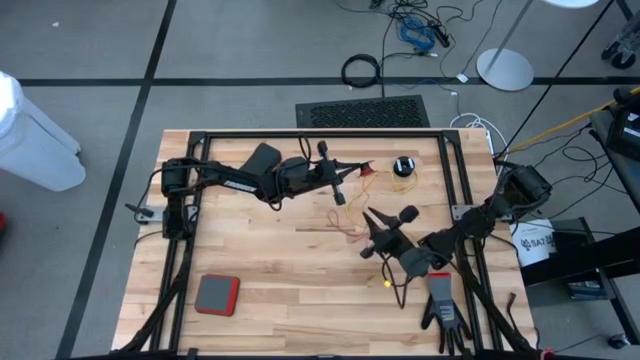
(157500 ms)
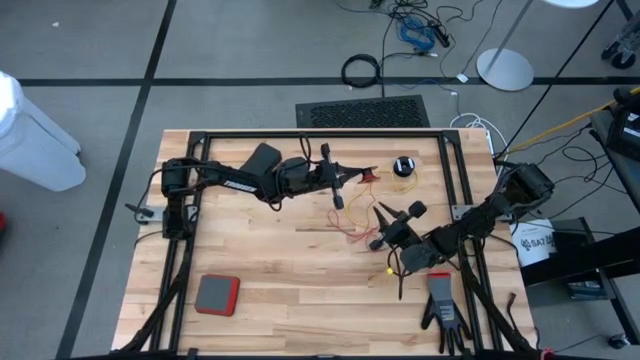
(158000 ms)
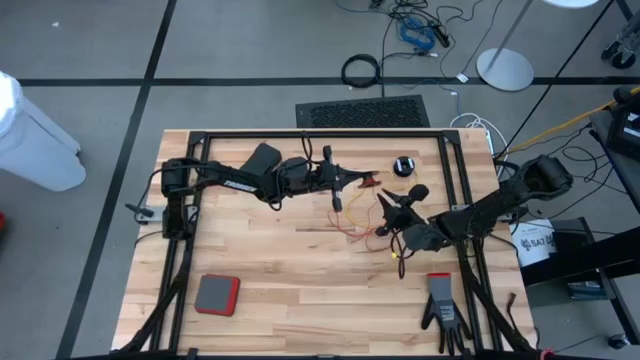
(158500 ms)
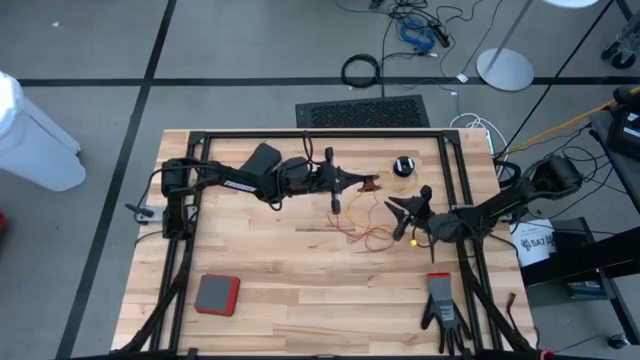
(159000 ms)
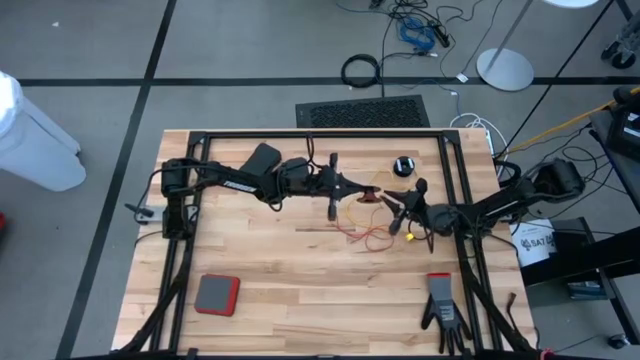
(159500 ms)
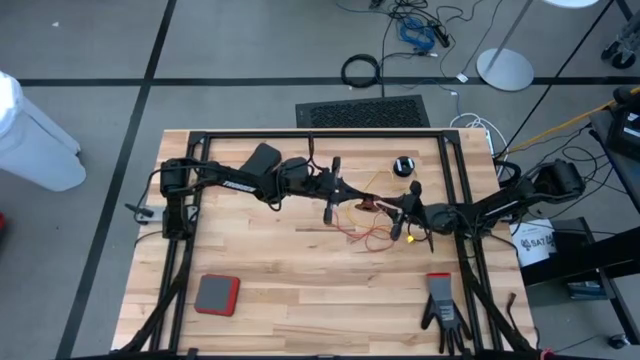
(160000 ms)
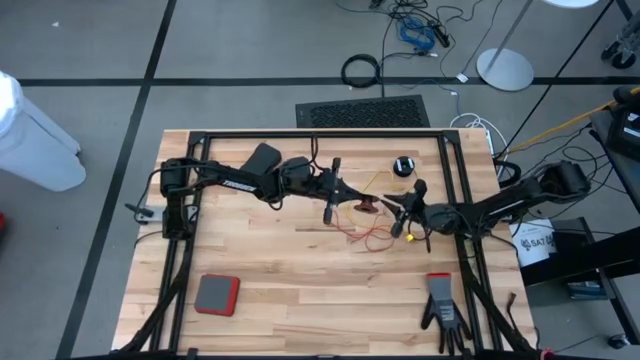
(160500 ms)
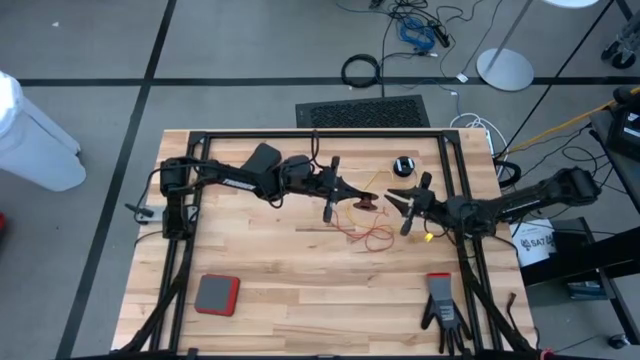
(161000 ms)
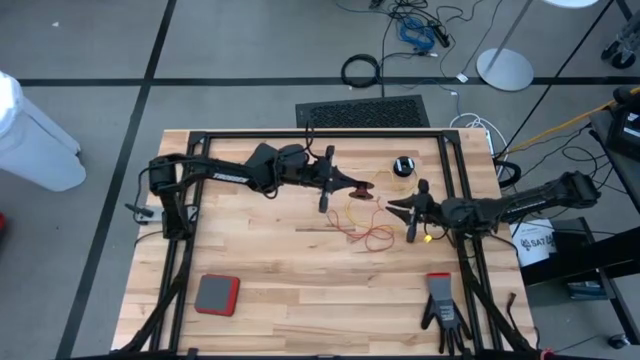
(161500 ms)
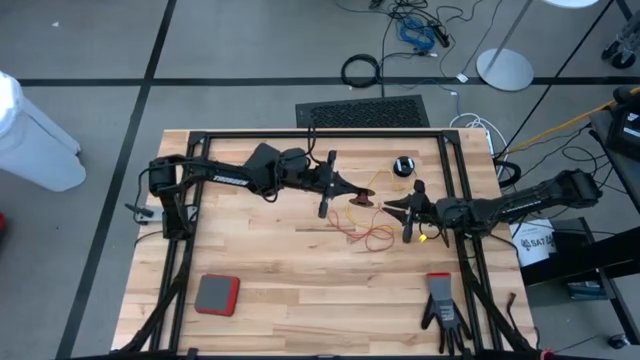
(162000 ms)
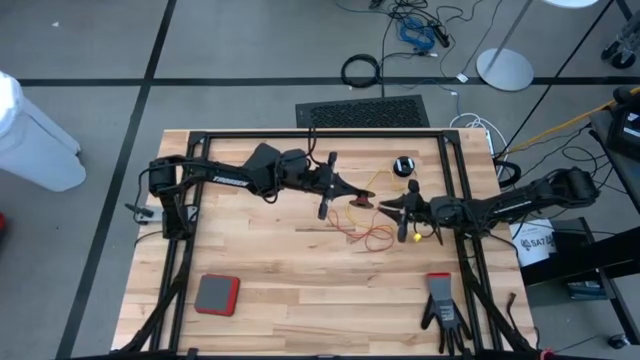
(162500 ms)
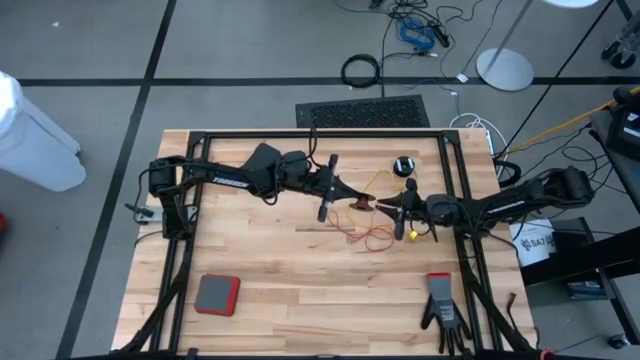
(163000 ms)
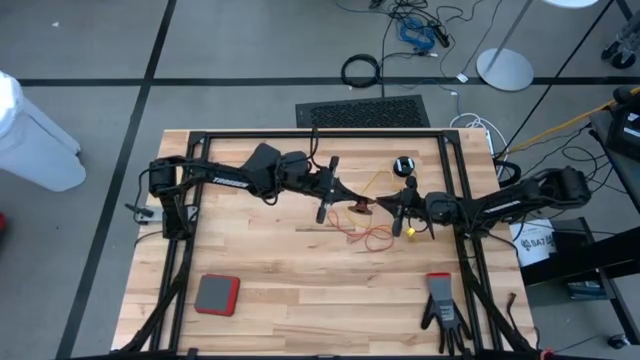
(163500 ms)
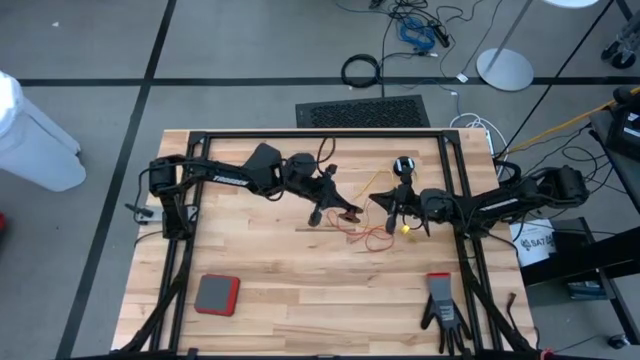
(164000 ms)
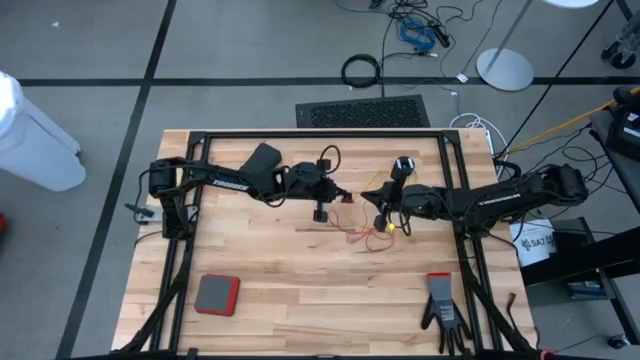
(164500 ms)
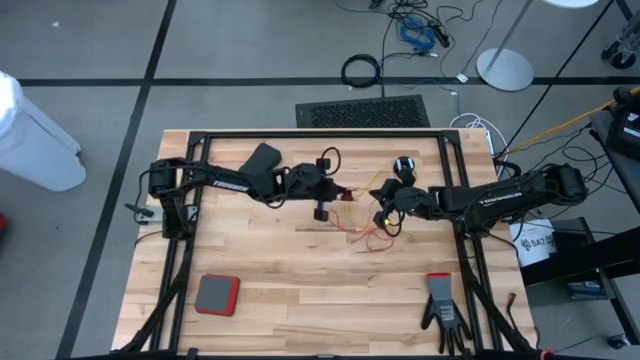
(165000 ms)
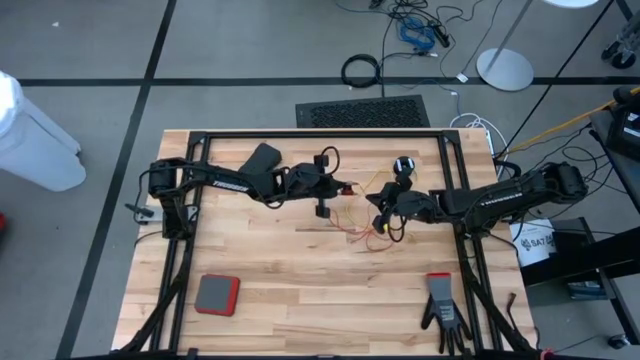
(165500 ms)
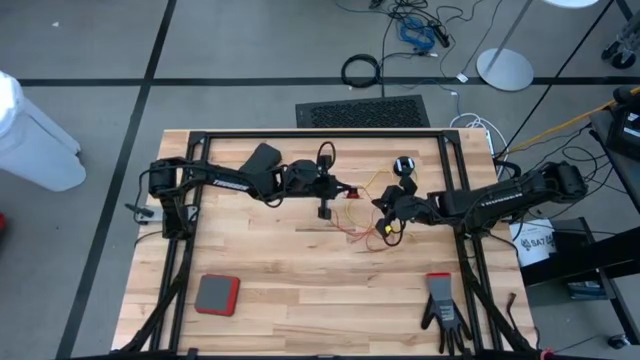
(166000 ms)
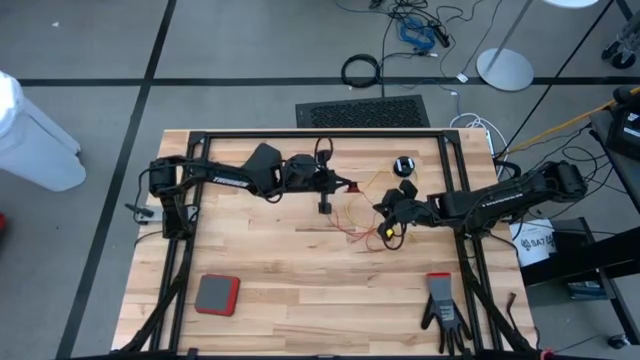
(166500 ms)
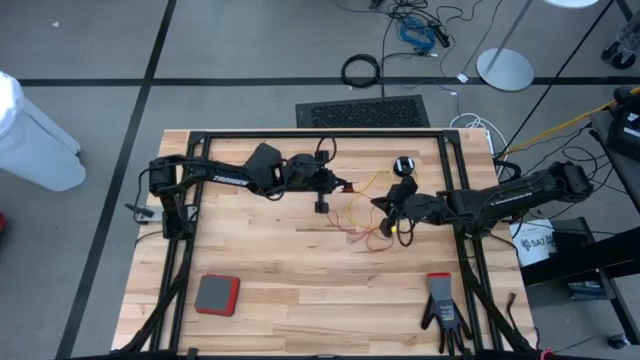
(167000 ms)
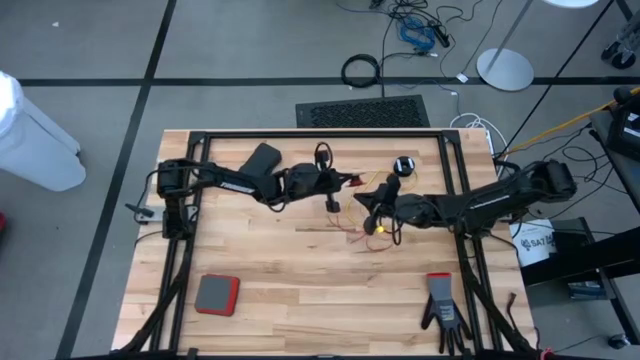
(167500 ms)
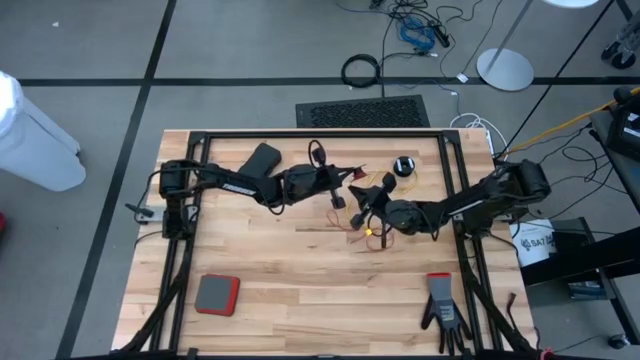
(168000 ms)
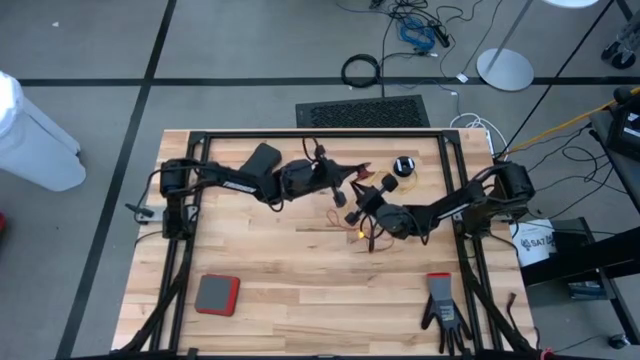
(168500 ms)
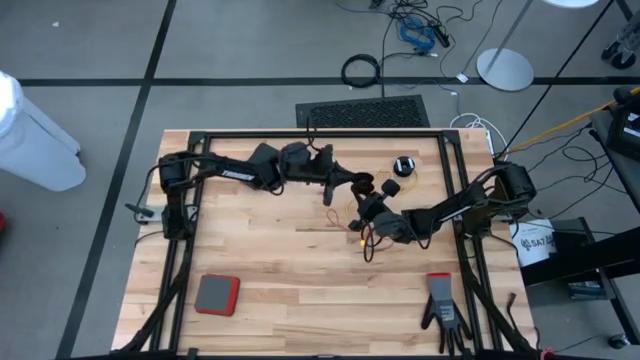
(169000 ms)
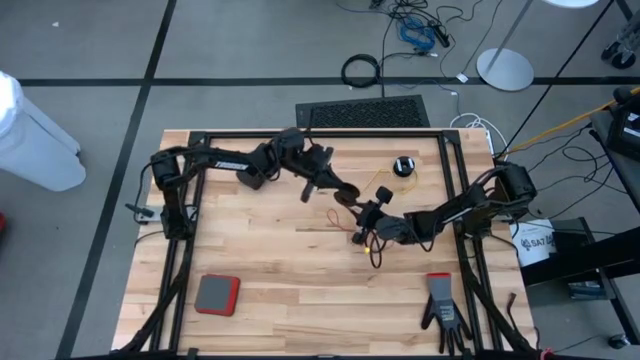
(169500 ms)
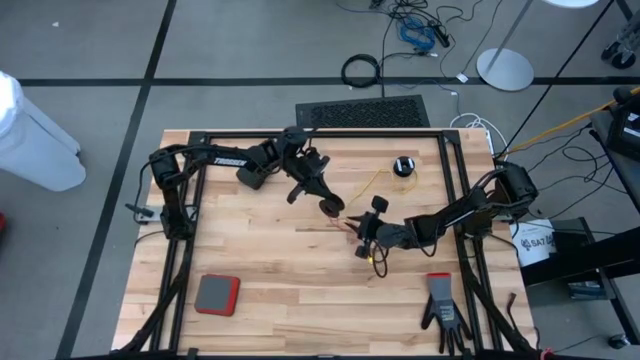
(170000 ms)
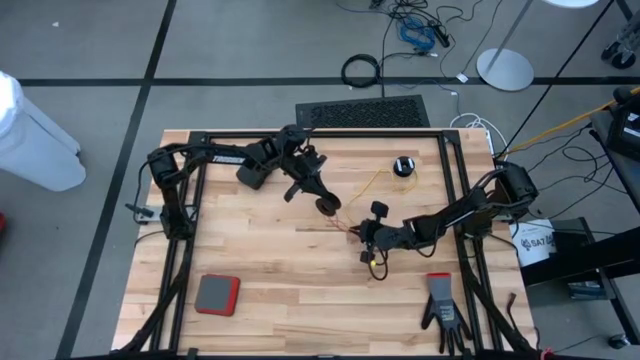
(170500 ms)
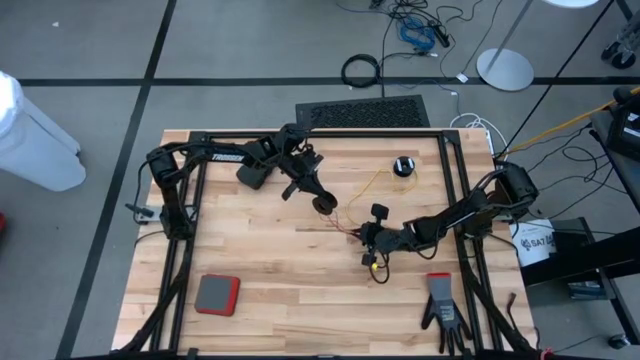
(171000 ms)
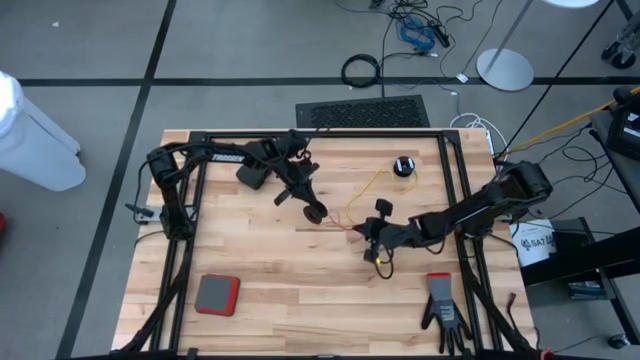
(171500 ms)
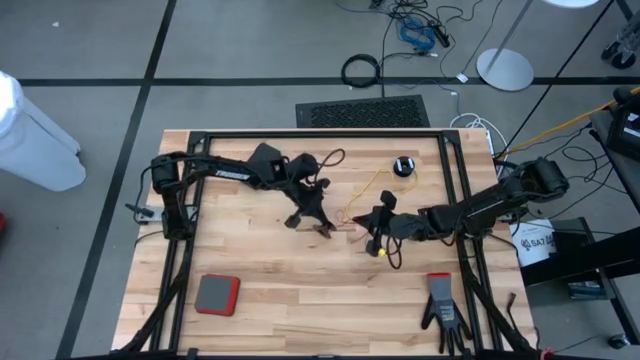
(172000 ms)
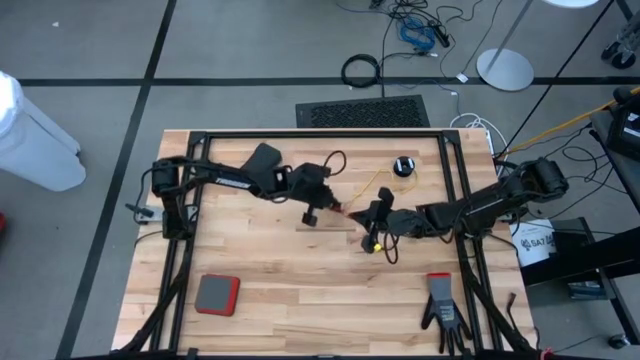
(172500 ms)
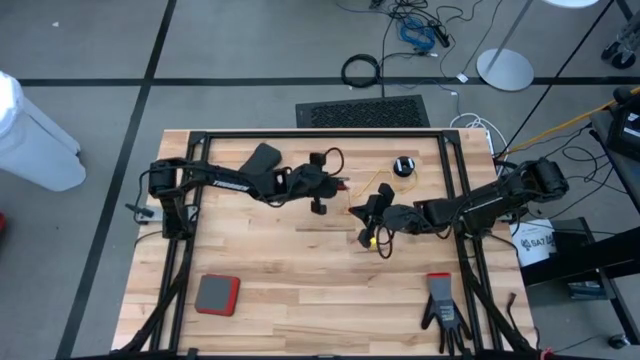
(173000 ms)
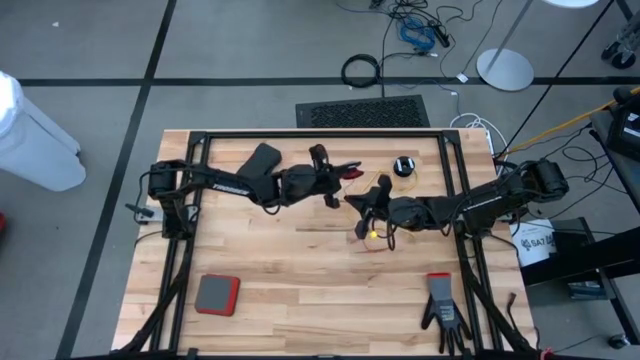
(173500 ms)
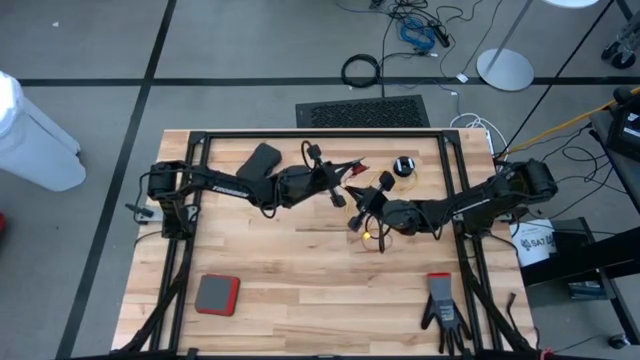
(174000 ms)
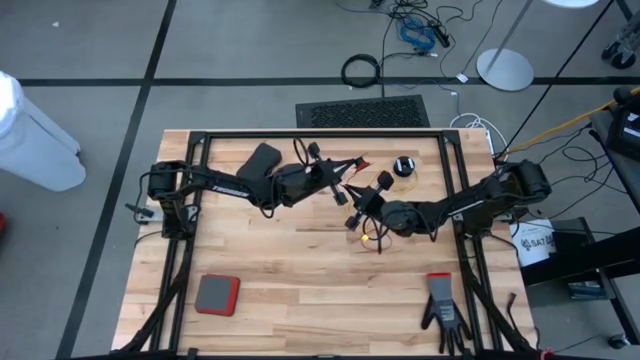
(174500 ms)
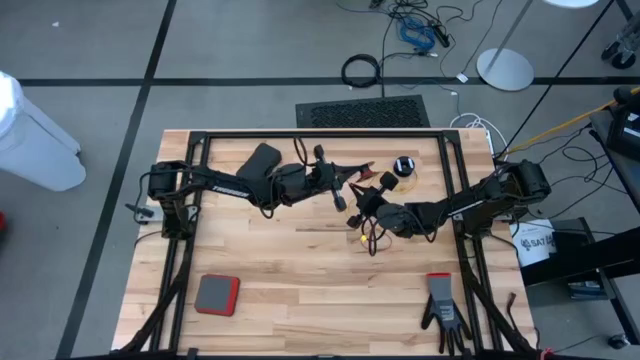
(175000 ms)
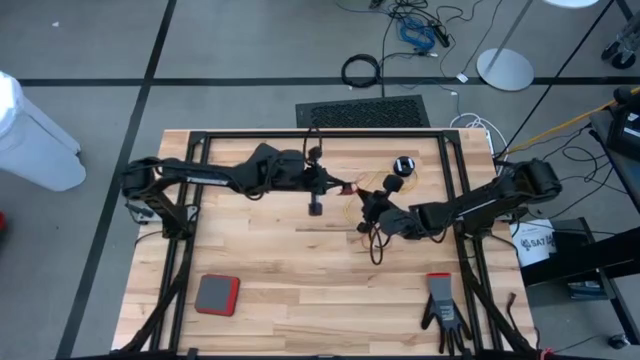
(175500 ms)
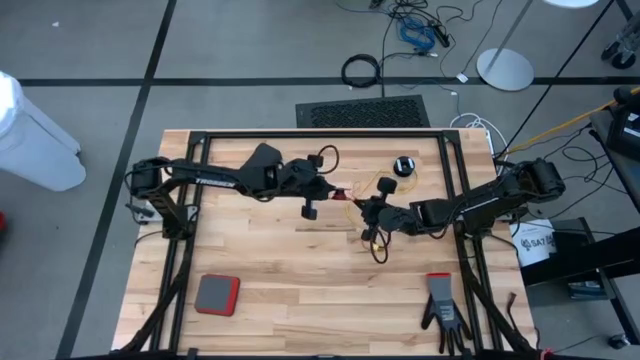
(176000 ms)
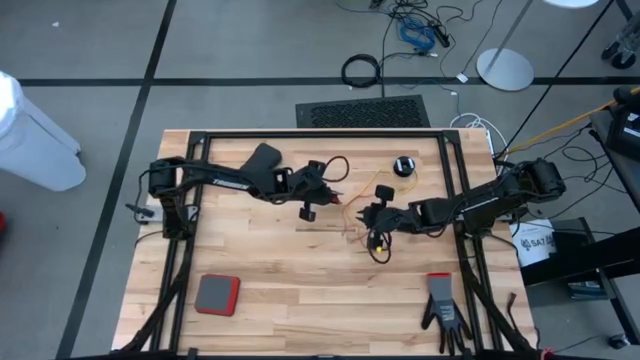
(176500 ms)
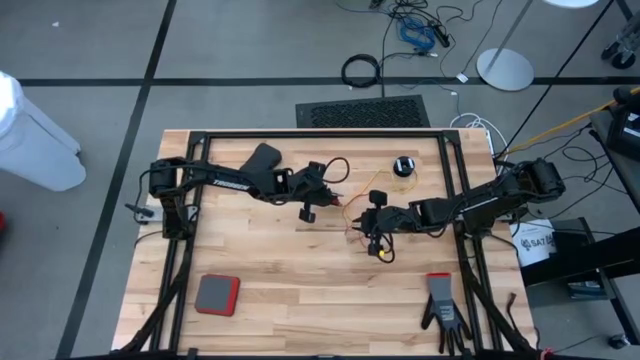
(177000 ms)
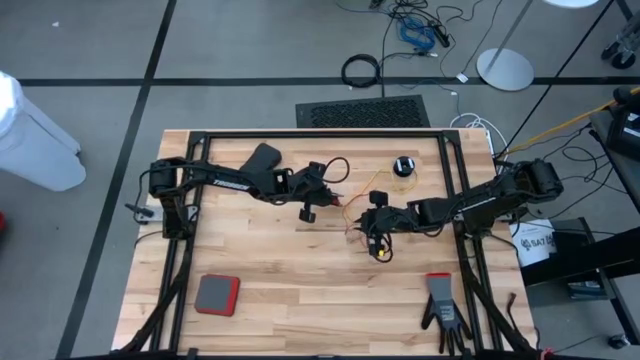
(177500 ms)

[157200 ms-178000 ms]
Task: Coil cords
Coil the red wire on the spool

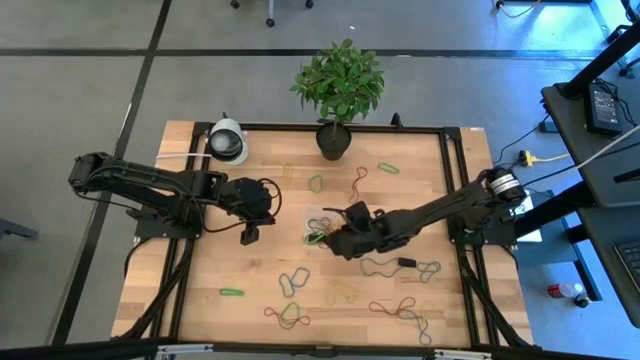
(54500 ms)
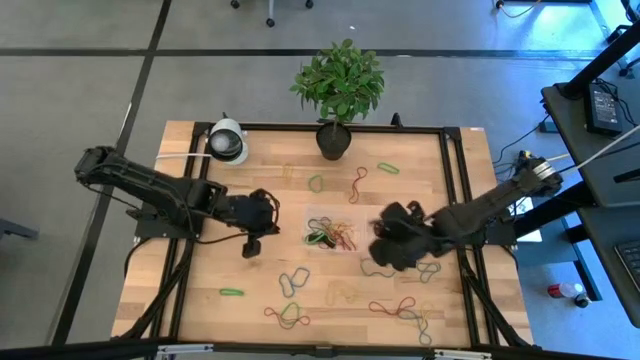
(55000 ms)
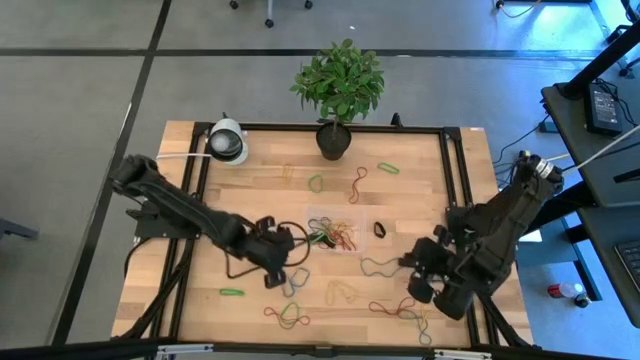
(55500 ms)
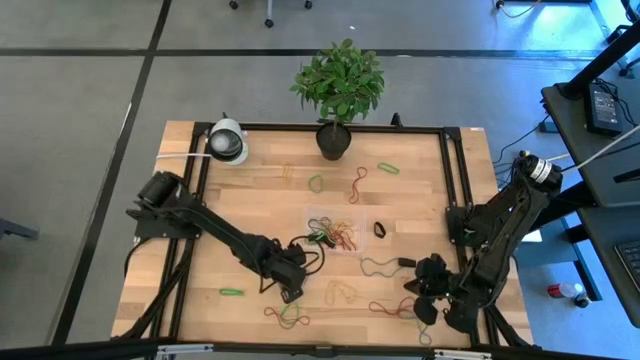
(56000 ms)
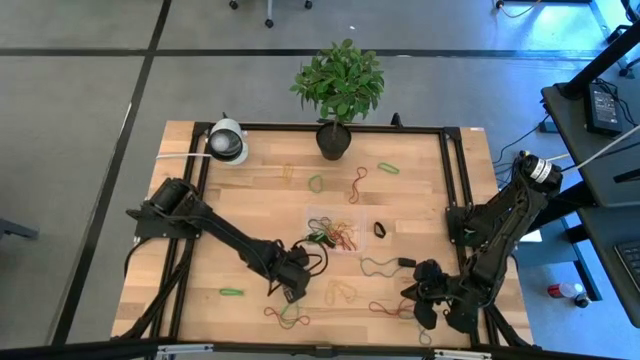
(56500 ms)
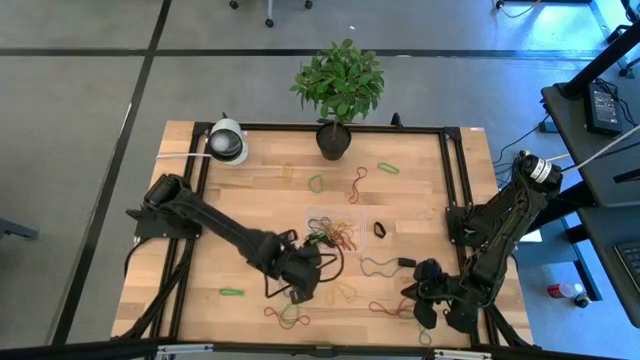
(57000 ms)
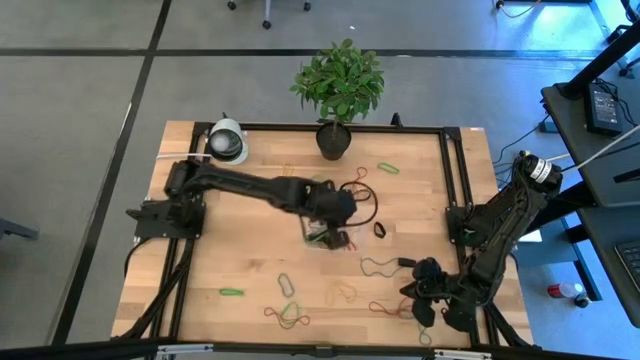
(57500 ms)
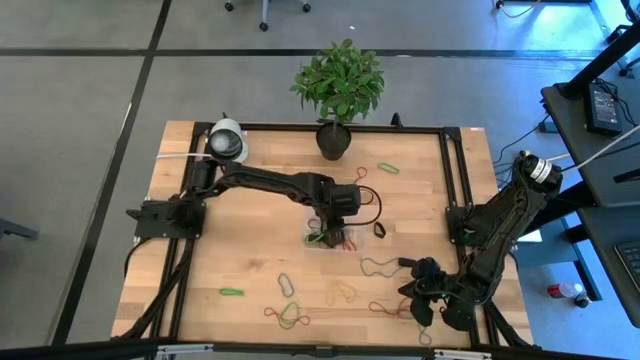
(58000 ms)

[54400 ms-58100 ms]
Task: Pick and place rubber bands into bin
Put the blue rubber band into the bin
